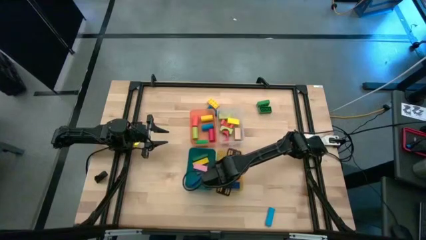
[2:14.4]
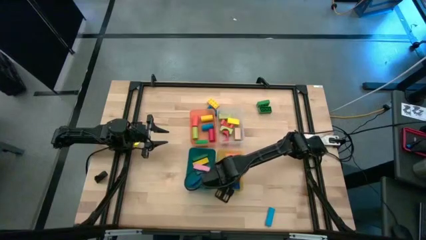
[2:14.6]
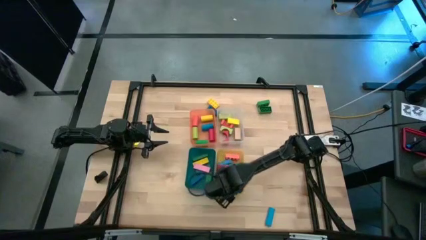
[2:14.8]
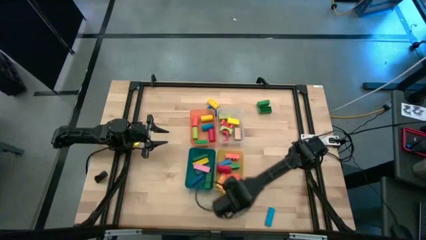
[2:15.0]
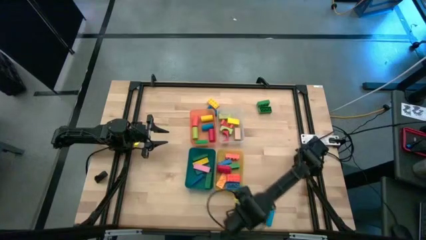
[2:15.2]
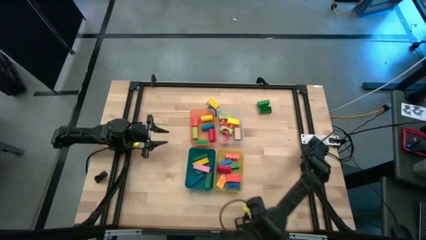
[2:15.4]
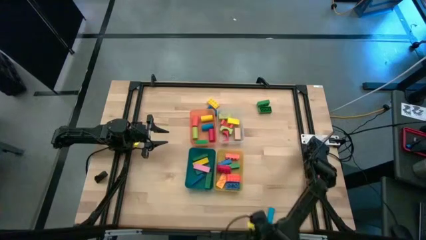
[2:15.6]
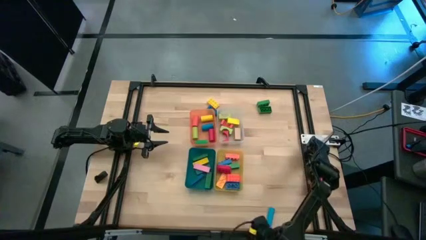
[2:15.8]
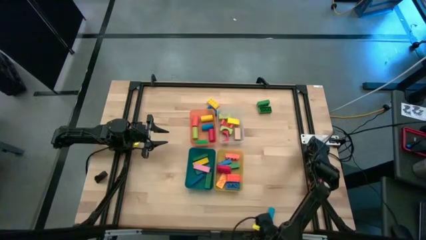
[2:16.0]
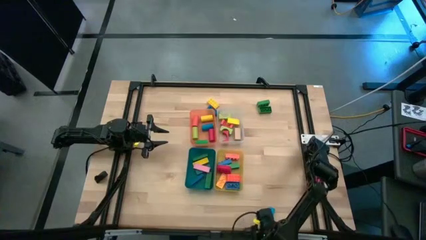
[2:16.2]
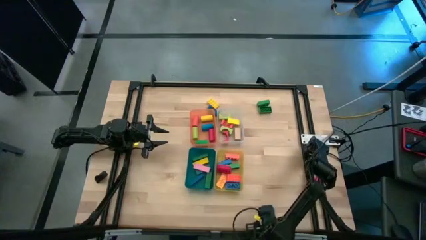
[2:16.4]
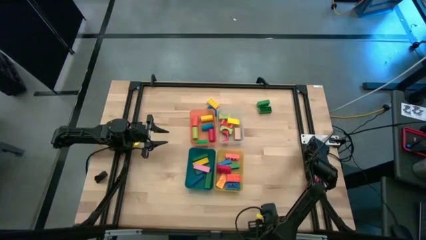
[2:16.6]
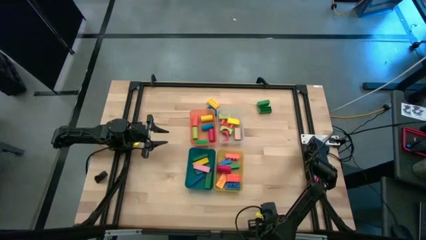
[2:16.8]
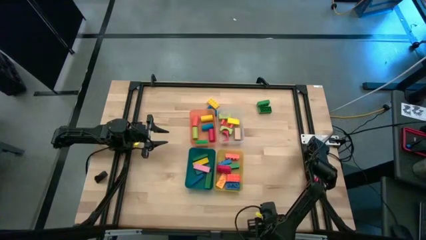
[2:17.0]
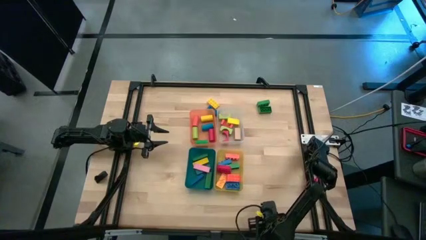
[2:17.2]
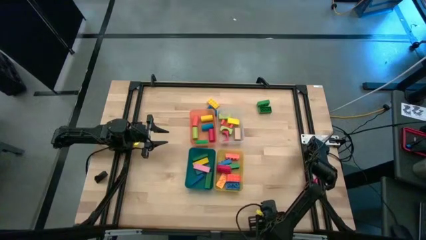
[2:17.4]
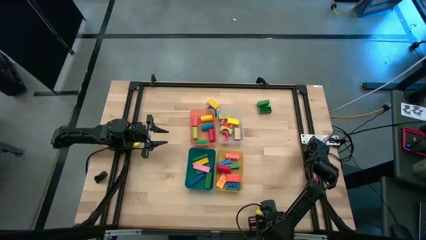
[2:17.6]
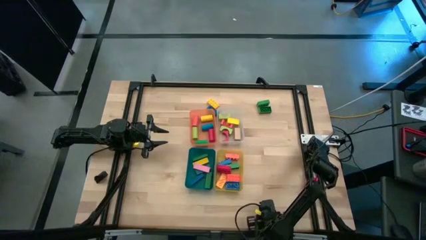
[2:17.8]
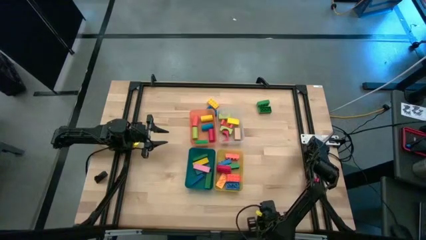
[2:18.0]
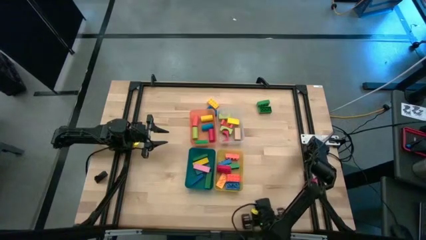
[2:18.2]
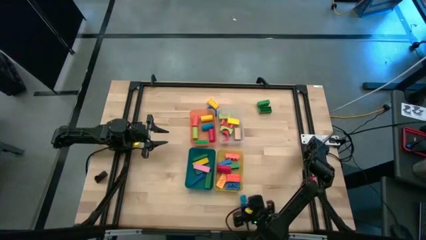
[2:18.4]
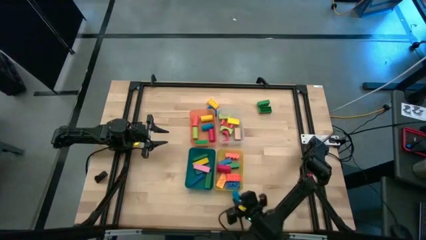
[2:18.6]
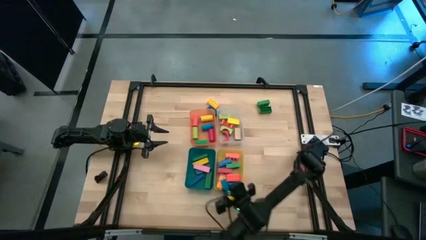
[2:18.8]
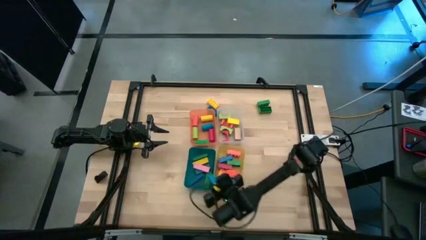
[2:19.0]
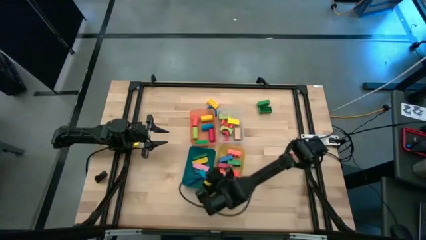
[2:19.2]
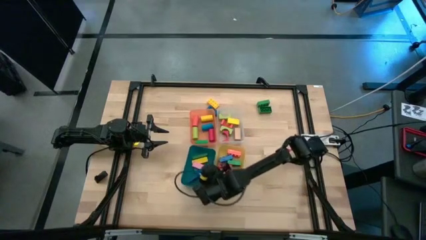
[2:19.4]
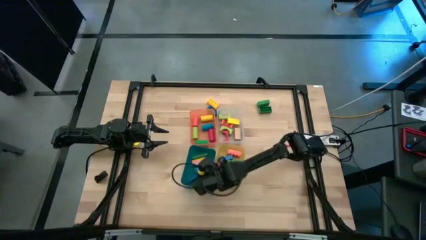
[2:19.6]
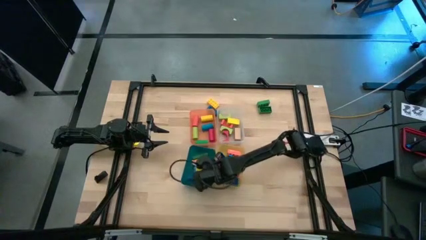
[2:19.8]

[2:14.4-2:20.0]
Task: Sort blocks by size
Put the blue rectangular block into the blue bin

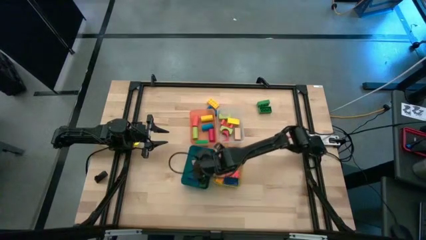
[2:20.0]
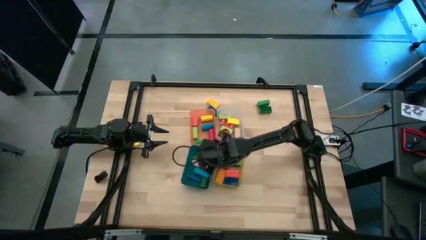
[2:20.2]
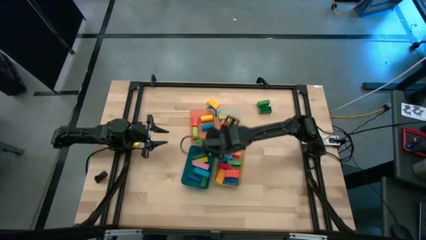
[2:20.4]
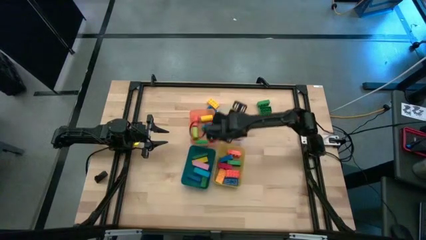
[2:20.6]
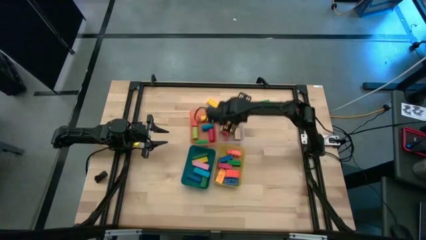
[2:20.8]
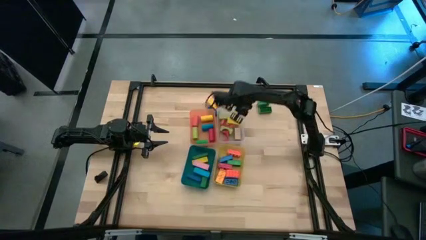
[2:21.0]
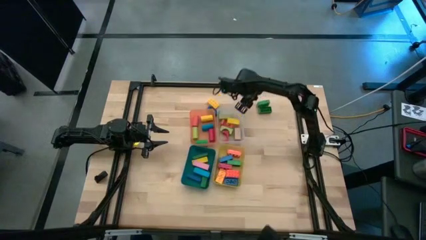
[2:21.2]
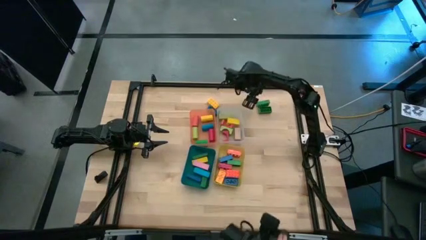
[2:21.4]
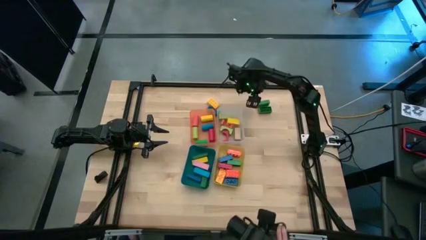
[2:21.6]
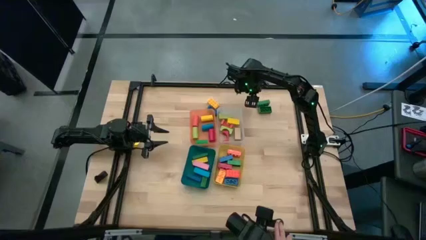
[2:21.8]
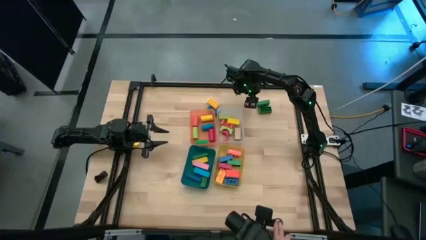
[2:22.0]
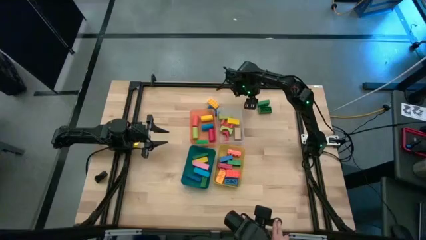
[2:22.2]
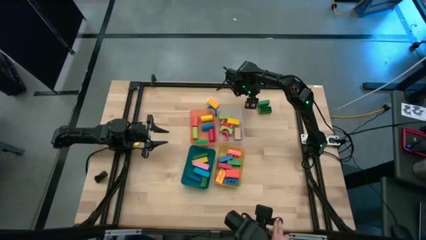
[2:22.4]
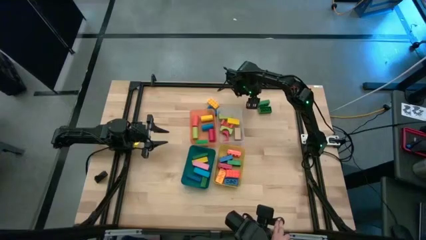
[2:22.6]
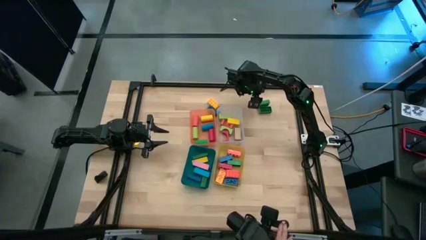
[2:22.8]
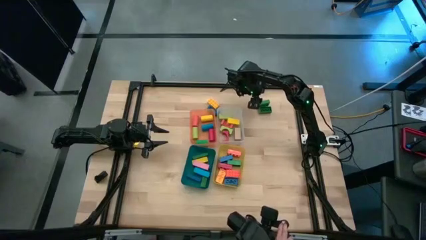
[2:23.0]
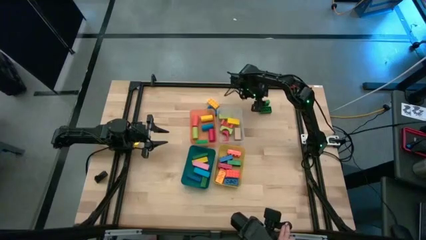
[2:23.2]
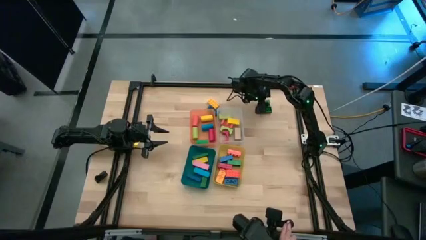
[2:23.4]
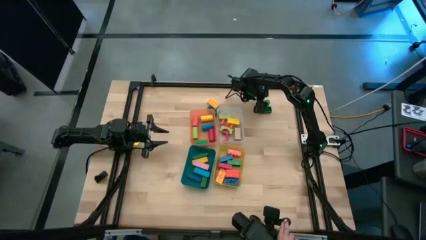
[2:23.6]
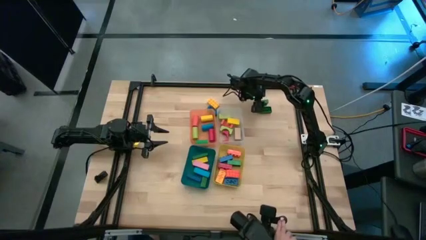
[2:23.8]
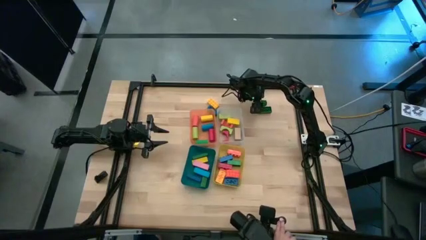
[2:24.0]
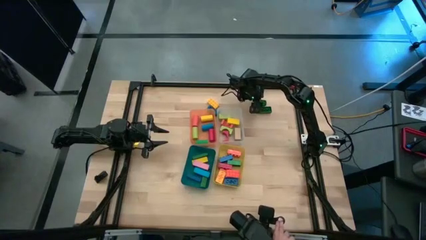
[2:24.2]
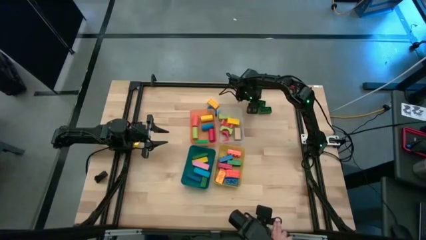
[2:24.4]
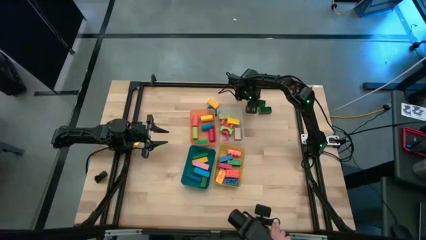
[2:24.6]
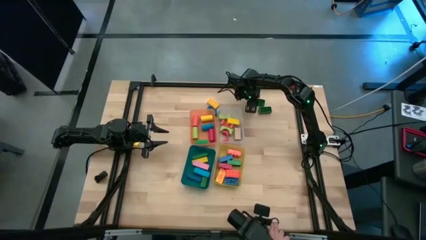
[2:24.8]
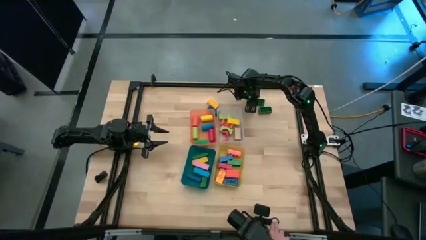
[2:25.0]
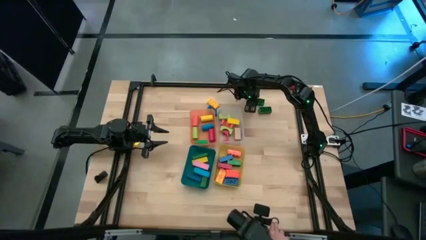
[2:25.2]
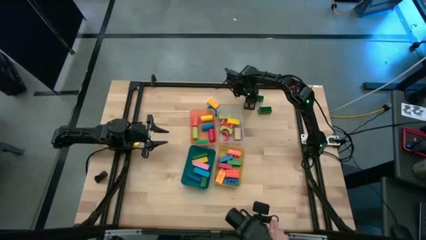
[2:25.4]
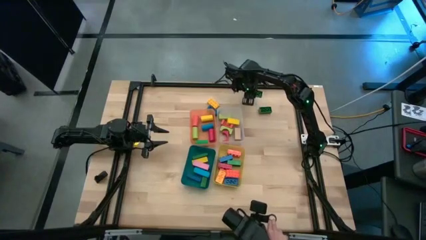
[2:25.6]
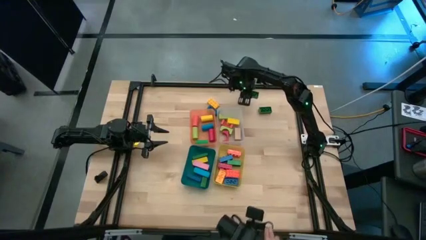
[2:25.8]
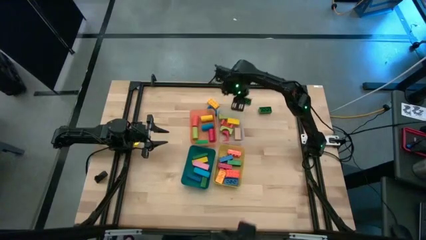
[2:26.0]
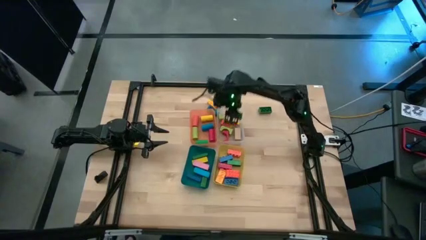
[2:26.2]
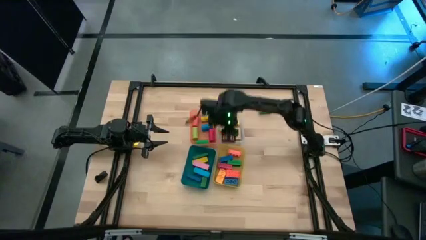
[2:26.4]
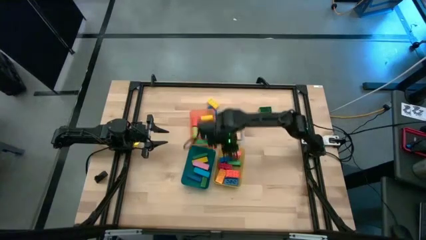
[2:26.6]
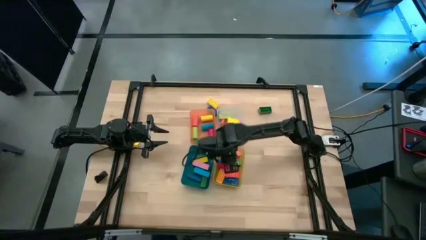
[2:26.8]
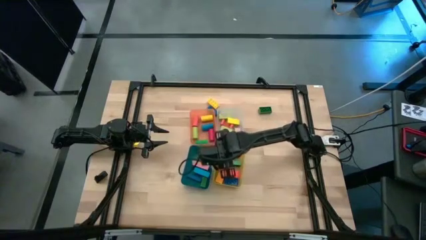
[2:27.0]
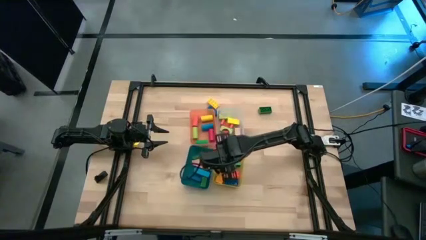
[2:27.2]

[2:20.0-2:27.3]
Put the top green game piece into the yellow bin

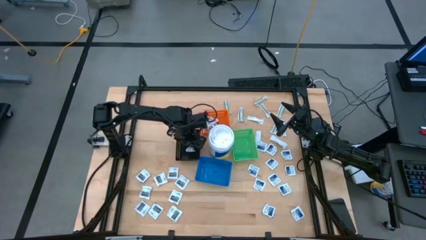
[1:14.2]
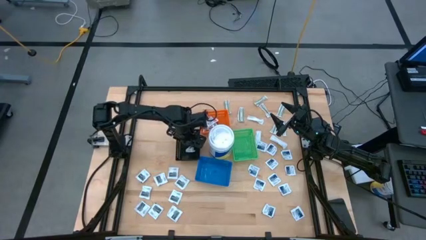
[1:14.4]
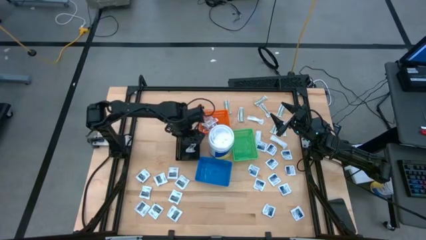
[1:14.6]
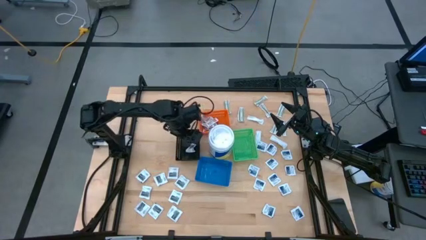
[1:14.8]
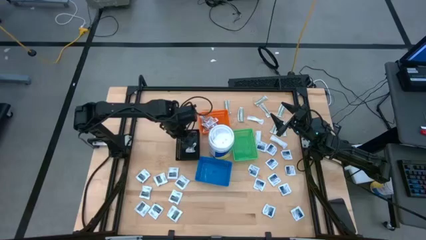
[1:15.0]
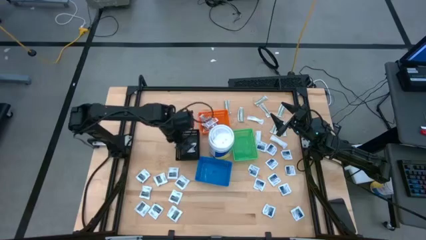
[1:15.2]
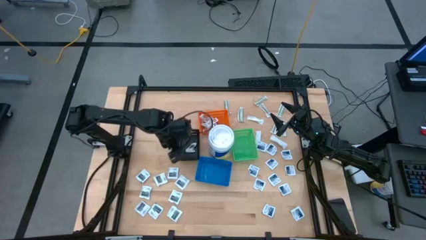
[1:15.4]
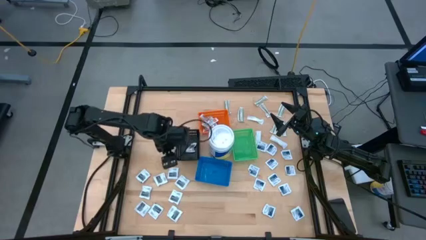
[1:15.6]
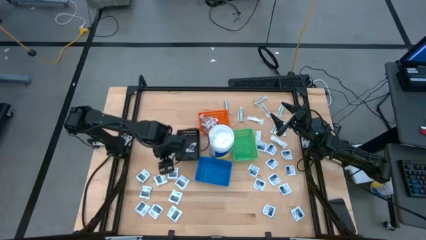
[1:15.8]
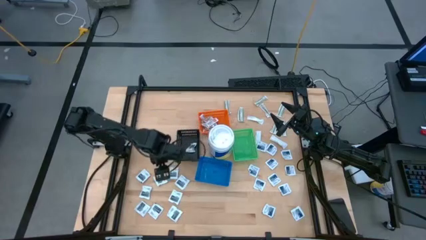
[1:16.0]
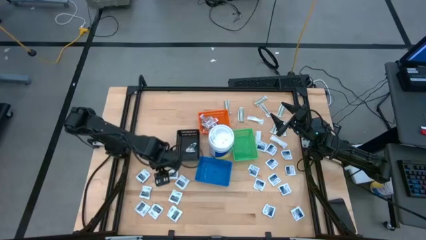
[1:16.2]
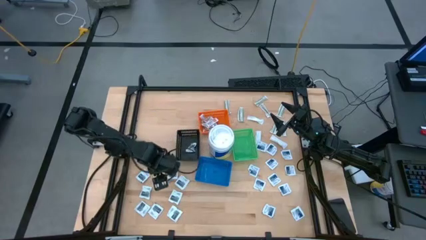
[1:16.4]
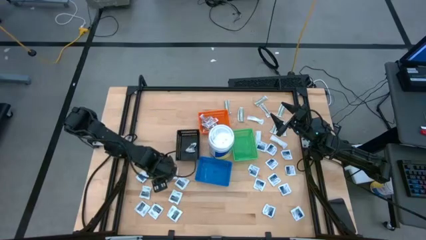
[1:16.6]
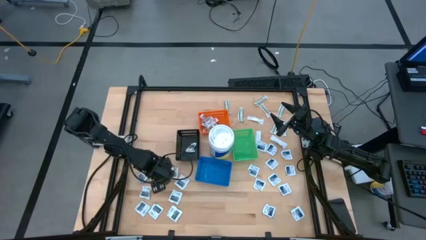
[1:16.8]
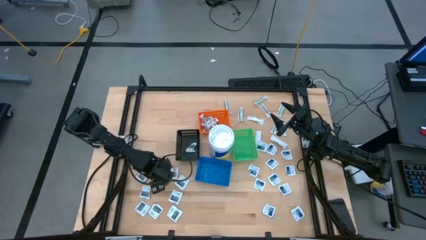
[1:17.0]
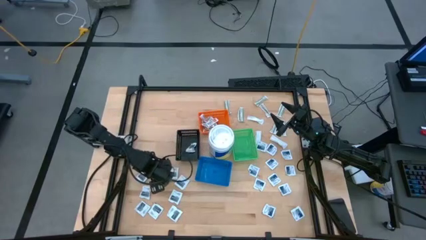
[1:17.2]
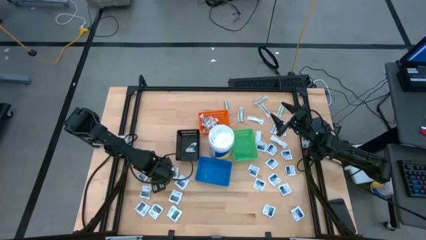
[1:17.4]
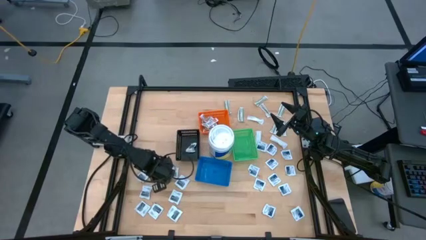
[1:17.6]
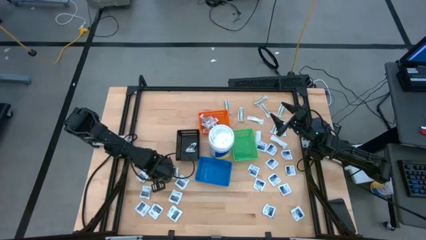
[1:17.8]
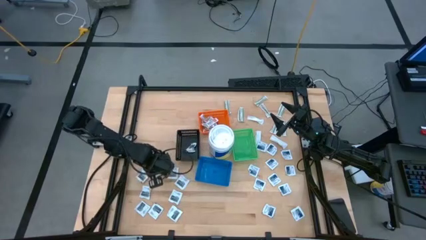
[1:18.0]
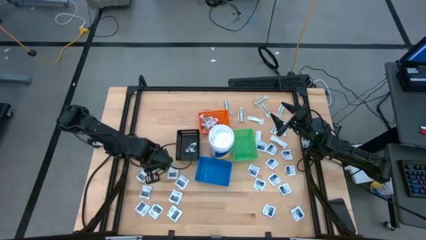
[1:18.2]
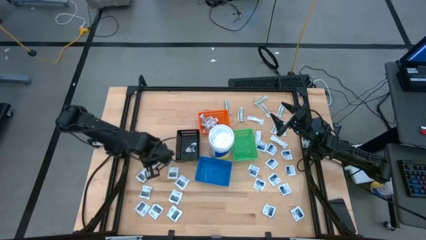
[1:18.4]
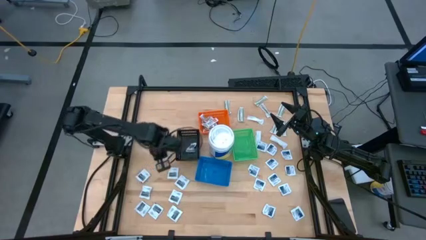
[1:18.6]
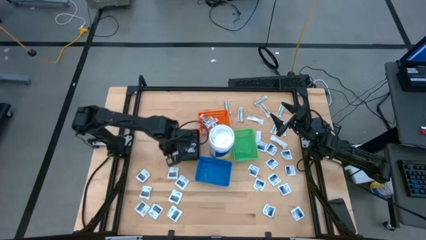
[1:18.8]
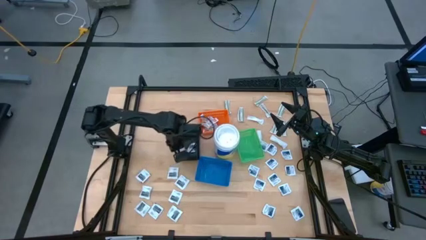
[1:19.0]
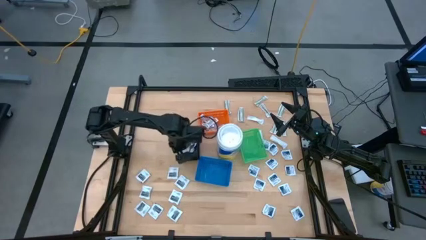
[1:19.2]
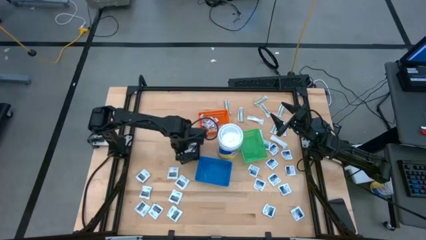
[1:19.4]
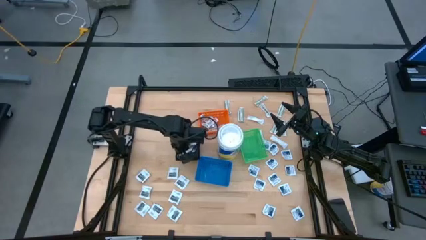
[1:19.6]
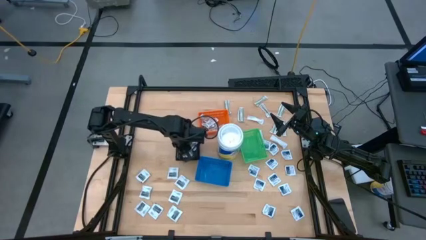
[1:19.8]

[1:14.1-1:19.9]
Task: Pick & Place First Aid Supplies
Put the gray towelette pack into the black bin
